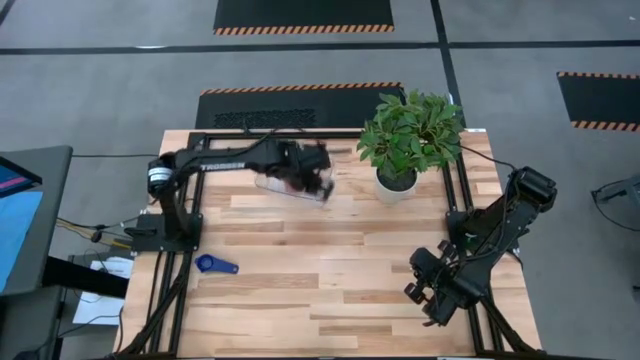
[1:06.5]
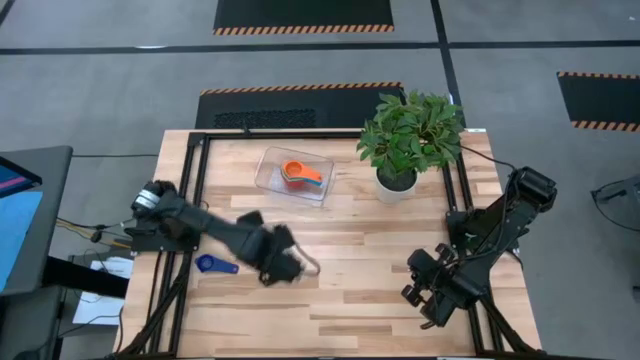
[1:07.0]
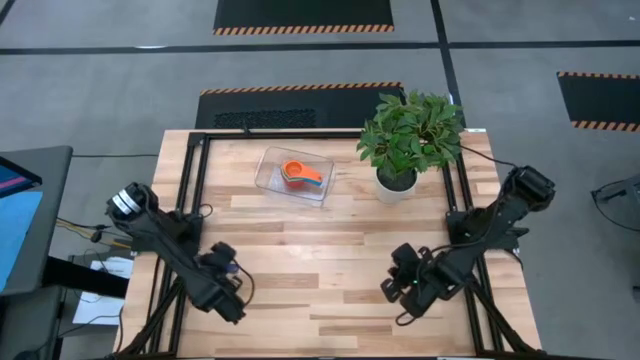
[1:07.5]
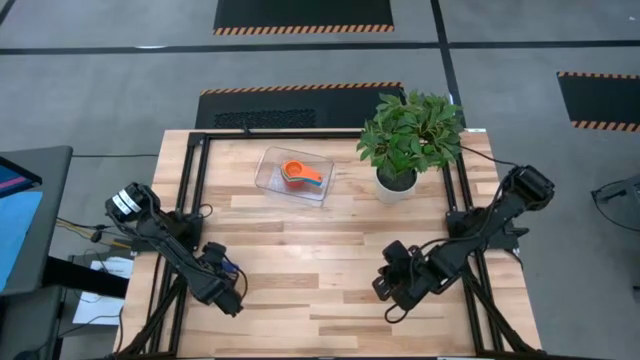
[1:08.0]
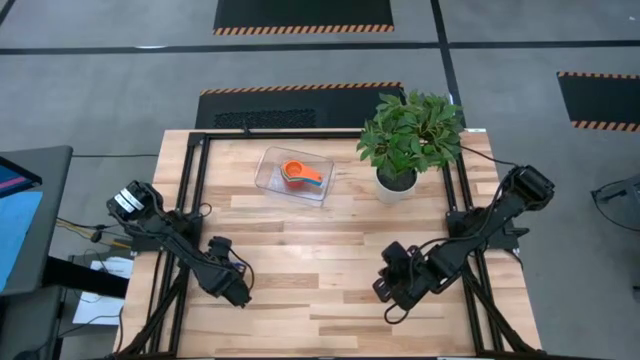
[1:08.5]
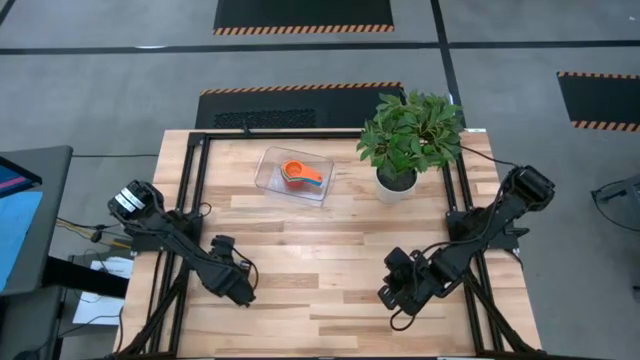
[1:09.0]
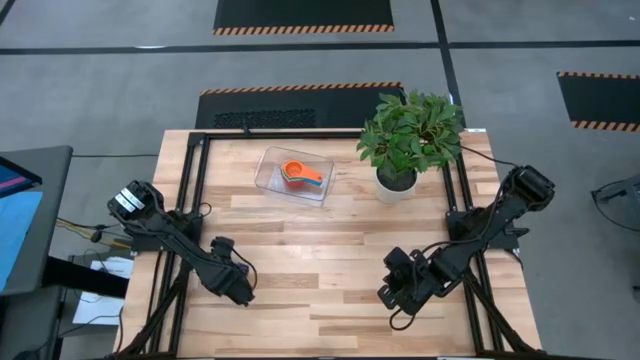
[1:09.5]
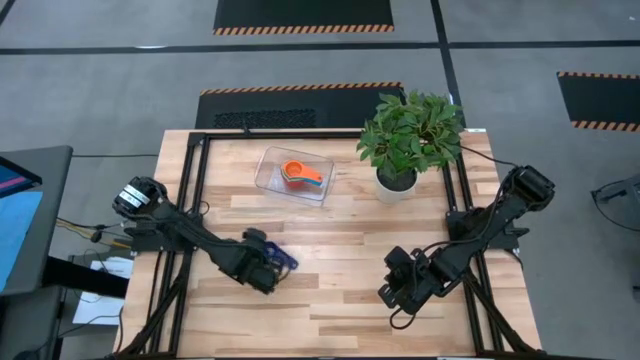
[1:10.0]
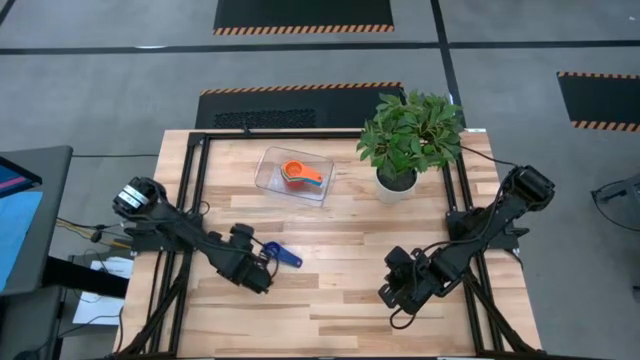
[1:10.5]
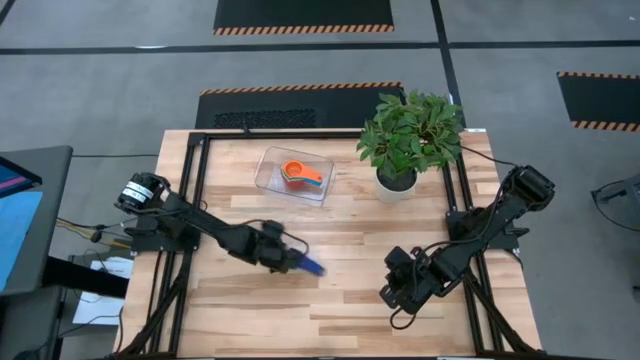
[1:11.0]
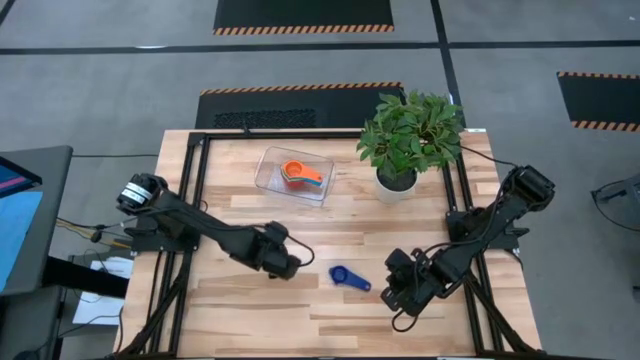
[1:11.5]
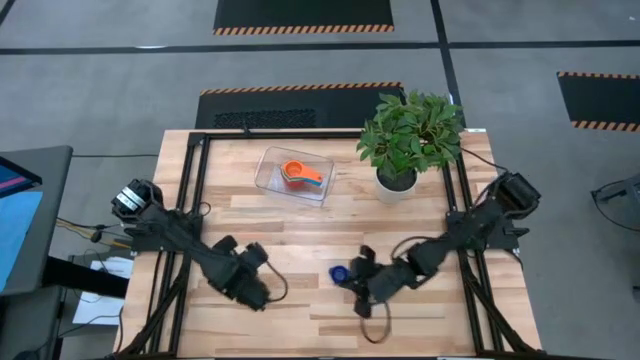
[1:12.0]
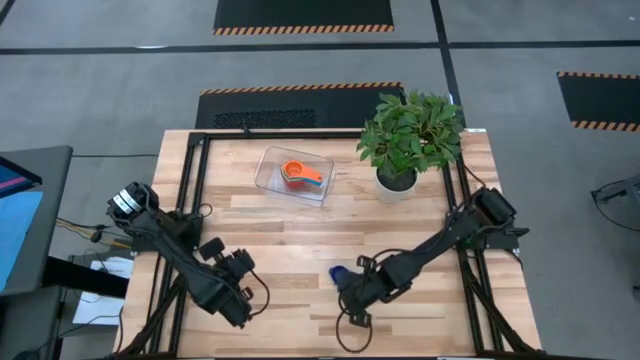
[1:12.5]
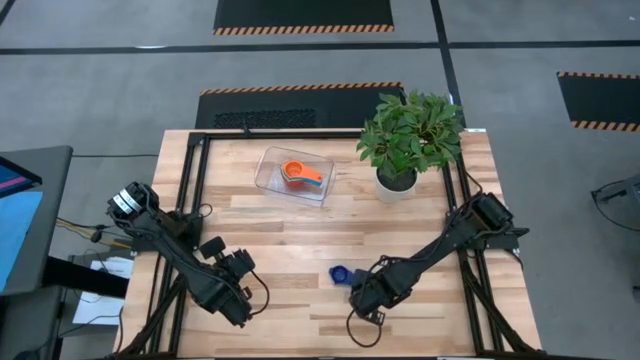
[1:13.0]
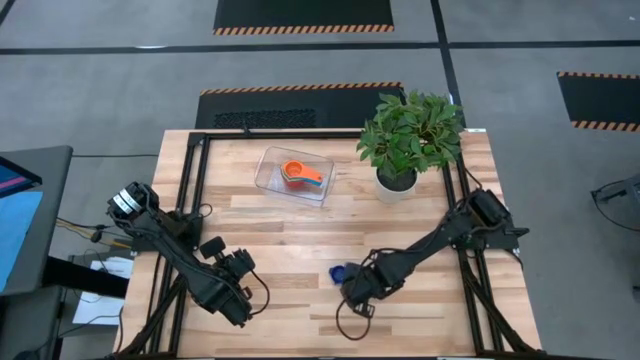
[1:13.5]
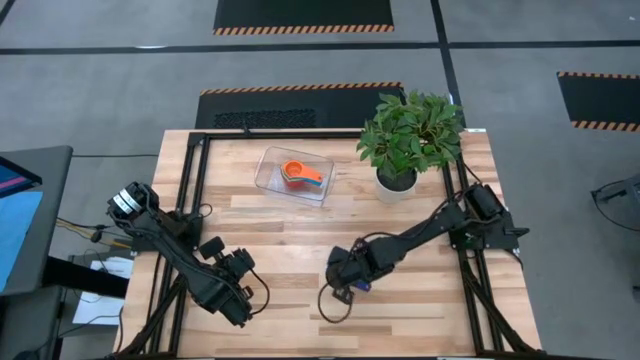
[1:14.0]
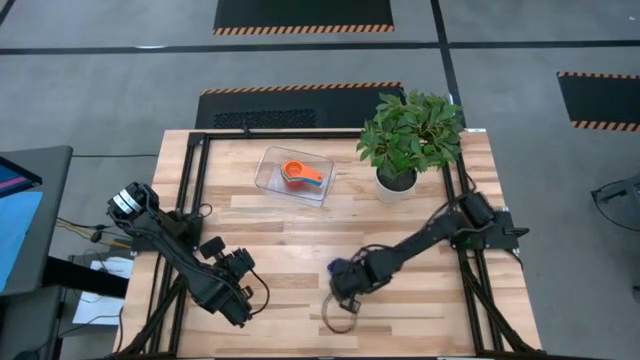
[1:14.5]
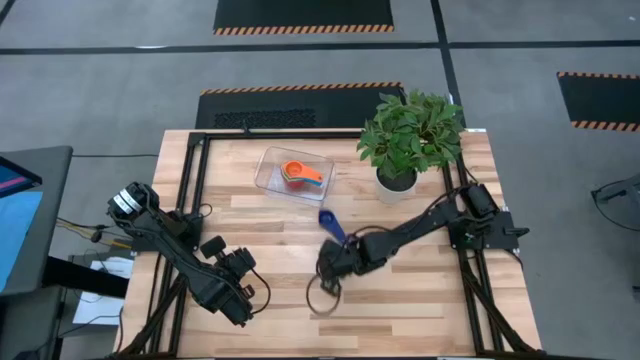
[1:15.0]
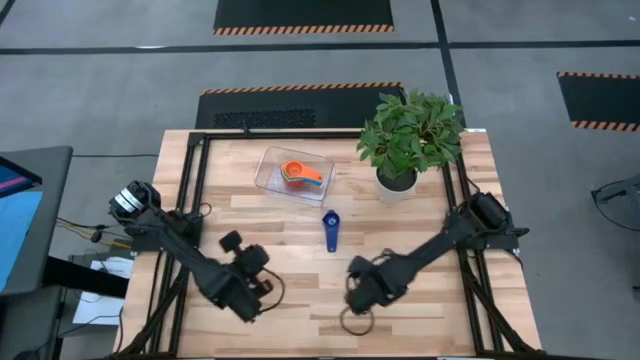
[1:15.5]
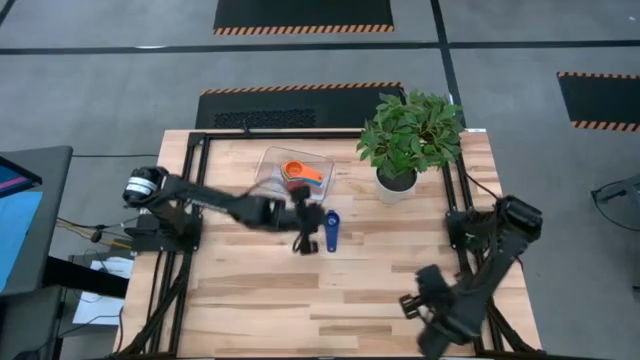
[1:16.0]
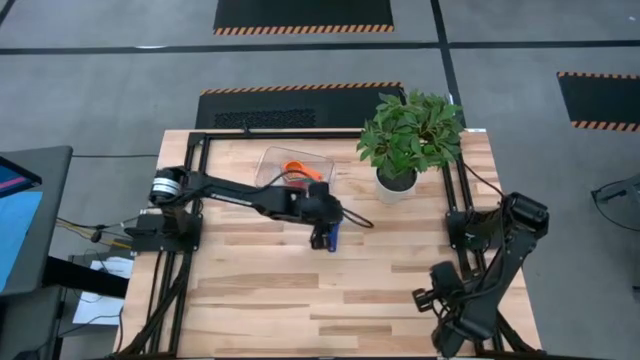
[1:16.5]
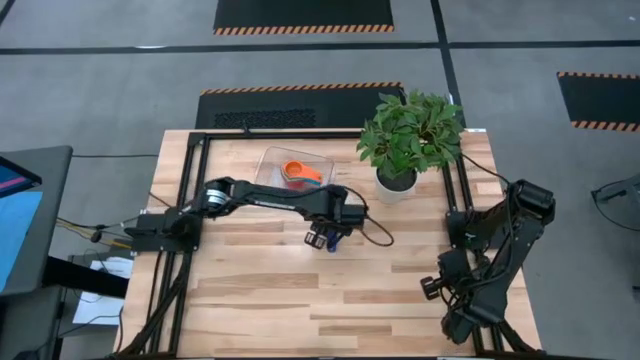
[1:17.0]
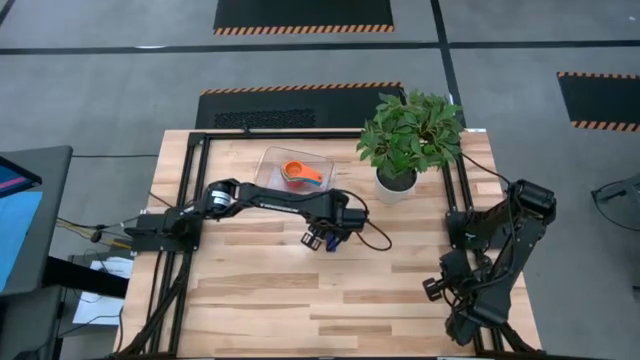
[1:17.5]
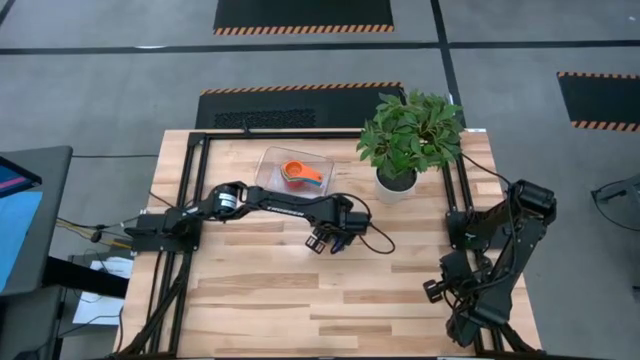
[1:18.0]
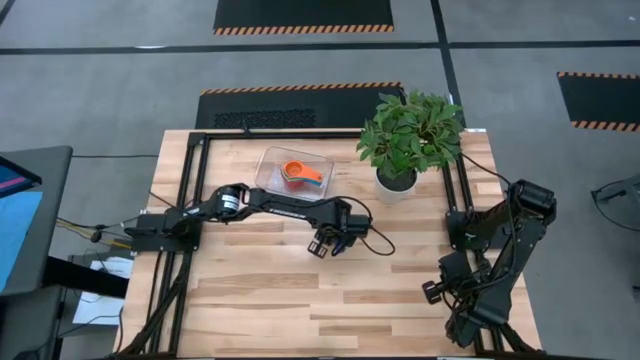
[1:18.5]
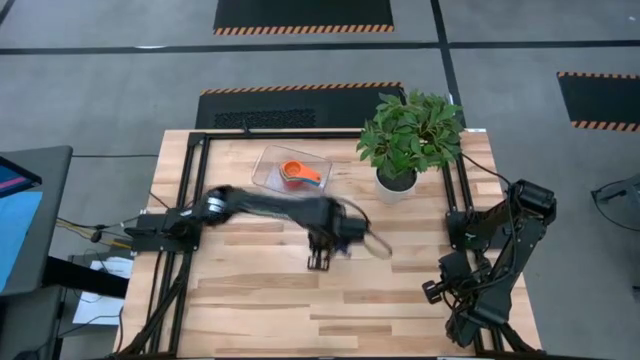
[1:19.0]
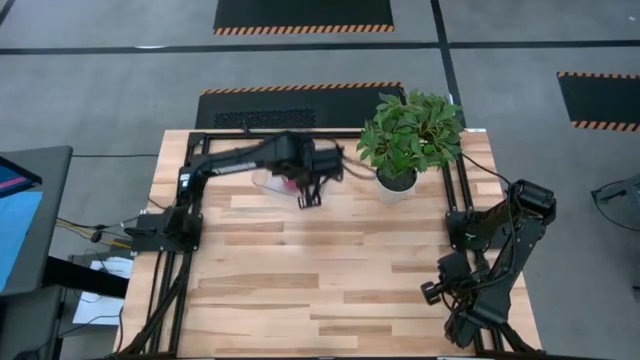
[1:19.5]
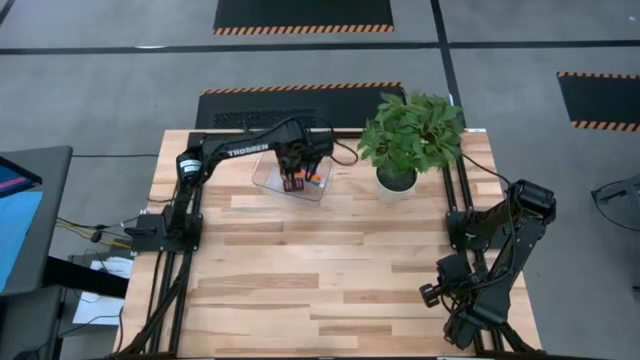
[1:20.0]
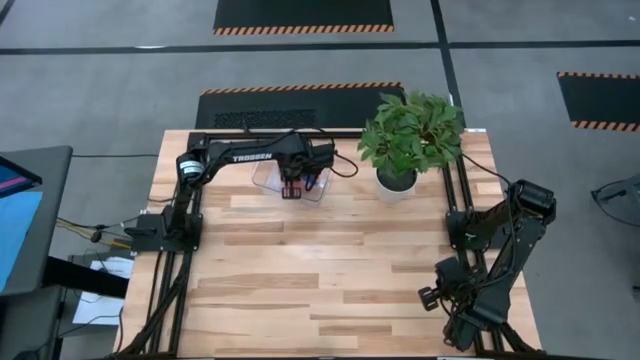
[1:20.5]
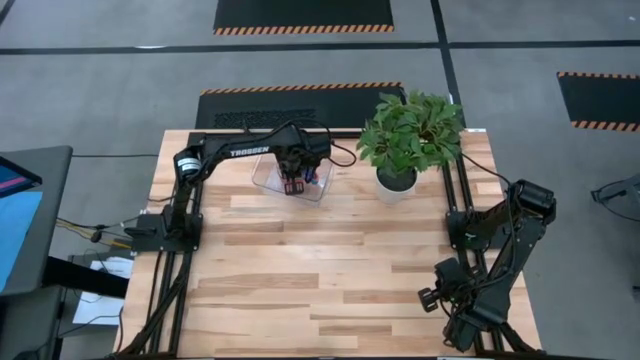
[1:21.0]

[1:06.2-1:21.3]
Task: Nest measuring cups in basket
Stack the dark blue measuring cup on top of the orange measuring cup in the transparent bin

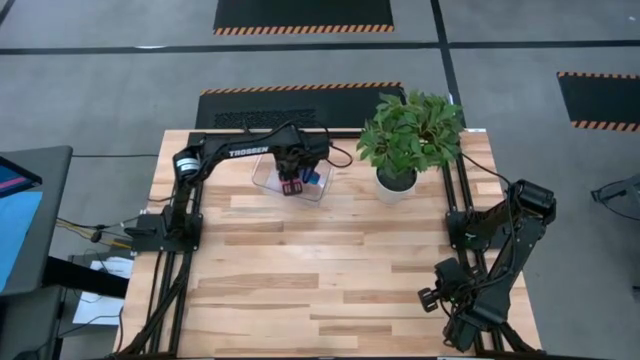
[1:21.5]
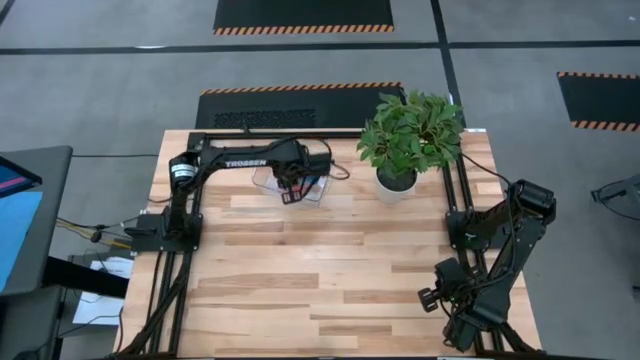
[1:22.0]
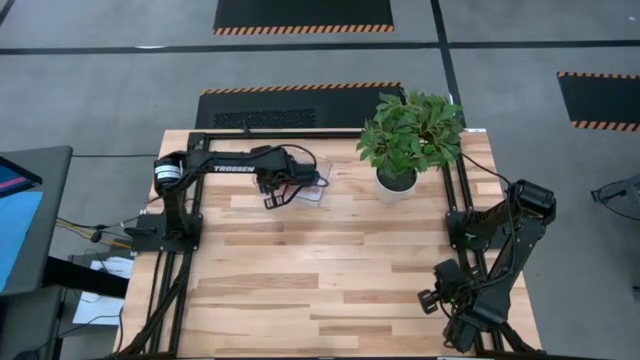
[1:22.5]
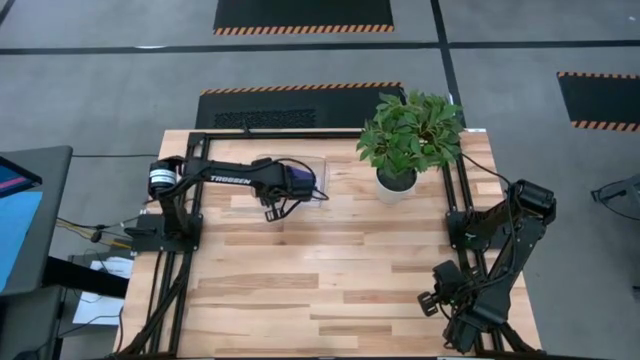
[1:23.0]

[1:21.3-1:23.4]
Adjust the transparent bin

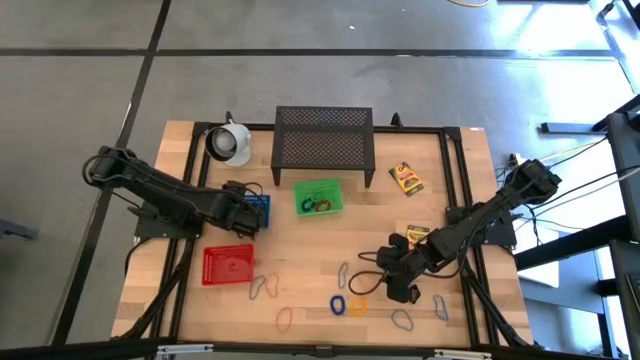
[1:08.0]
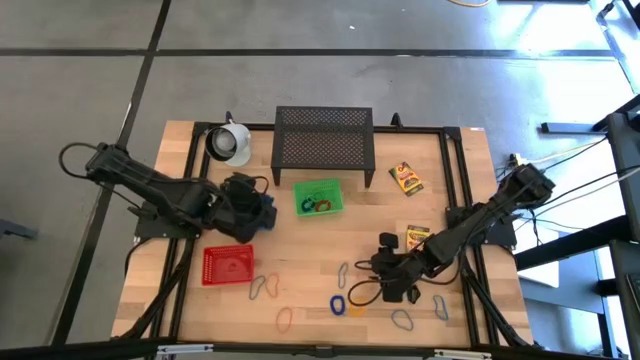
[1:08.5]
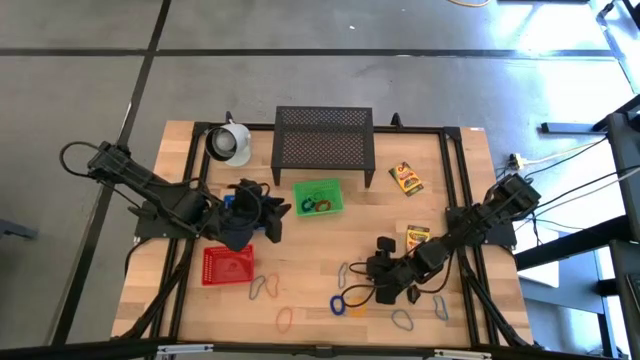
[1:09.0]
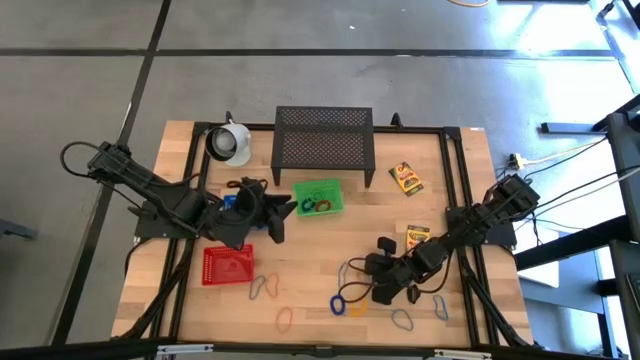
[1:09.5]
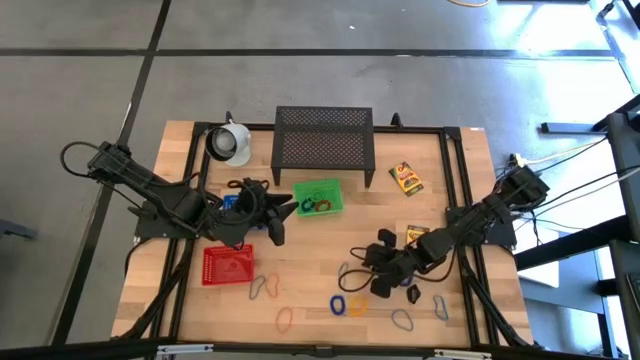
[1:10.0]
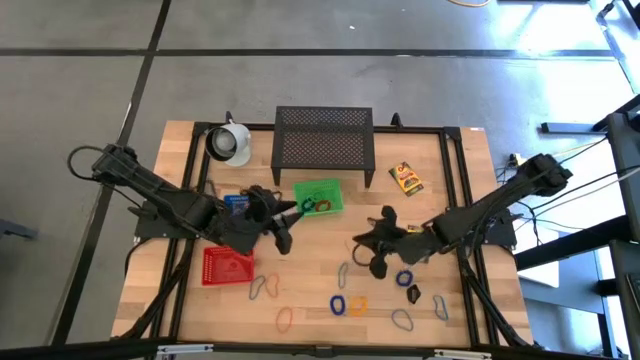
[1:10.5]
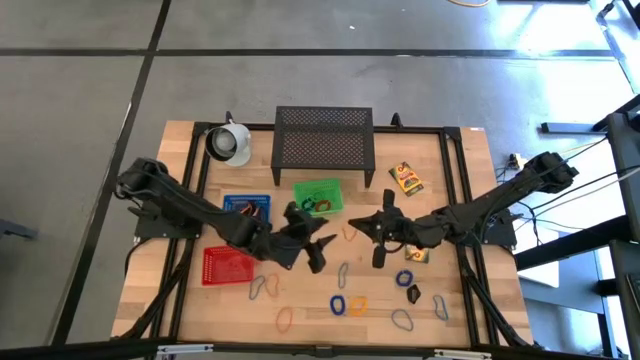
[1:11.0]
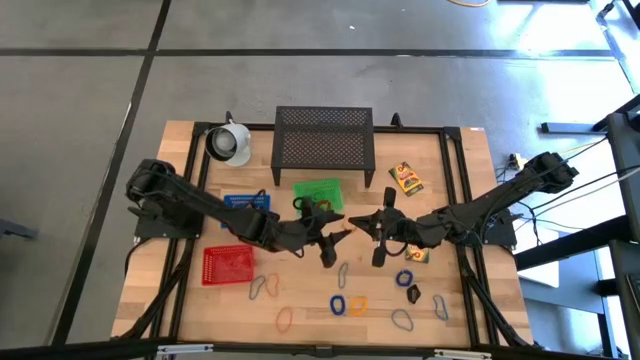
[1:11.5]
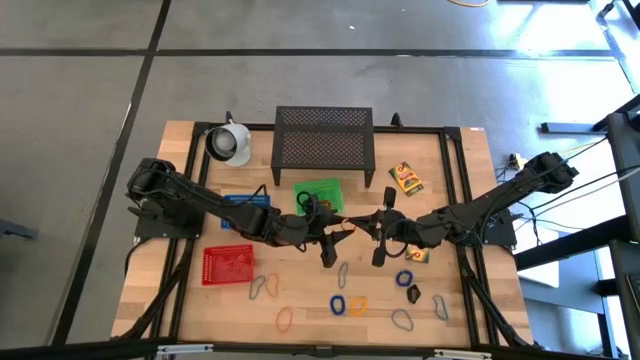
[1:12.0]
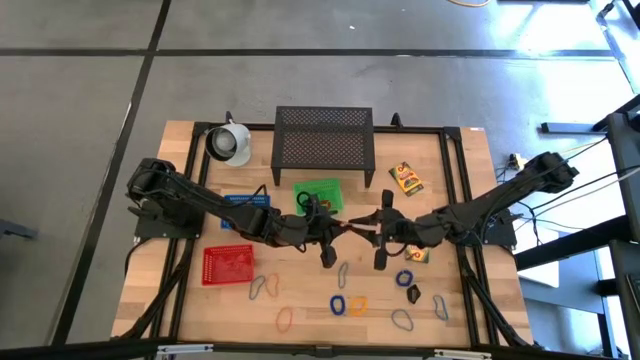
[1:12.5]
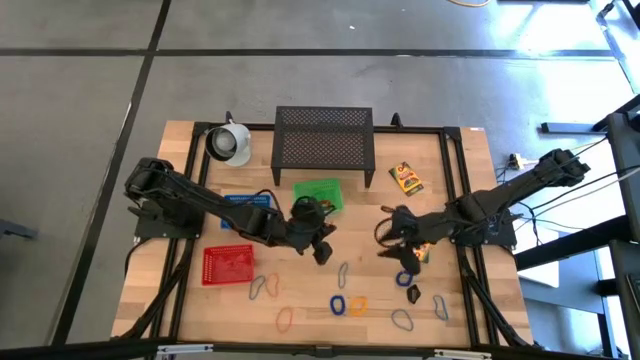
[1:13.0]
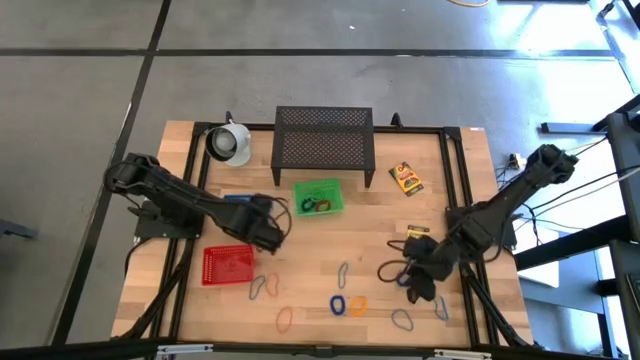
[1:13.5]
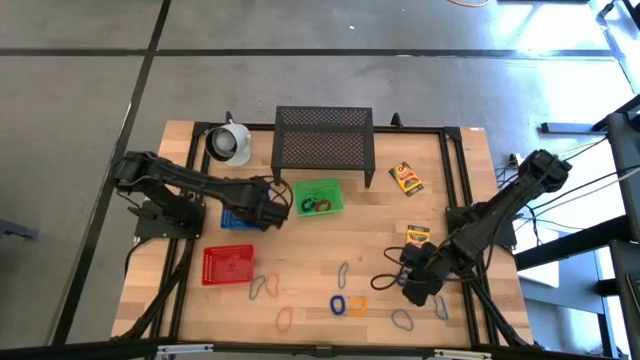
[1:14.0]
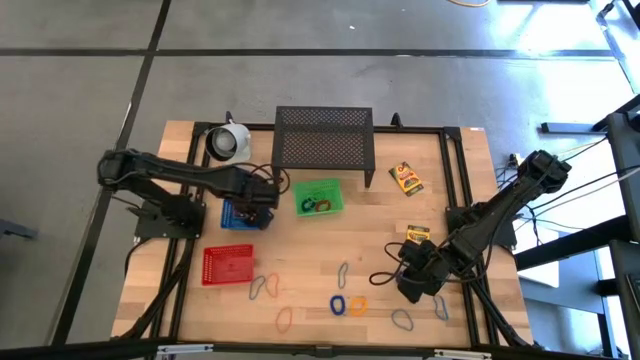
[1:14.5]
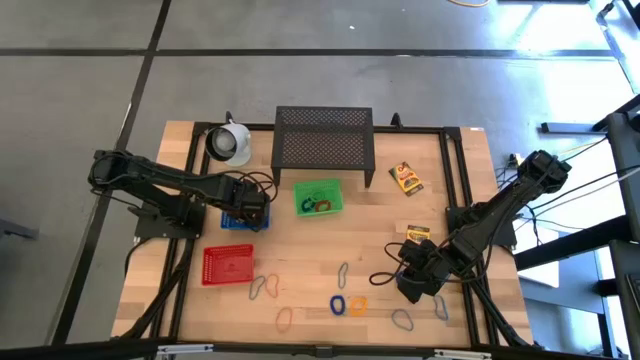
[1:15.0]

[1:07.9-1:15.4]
Task: Pick & Place Office Desk Supplies
Put the orange rubber band into the blue bin
